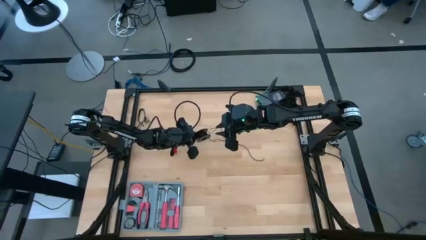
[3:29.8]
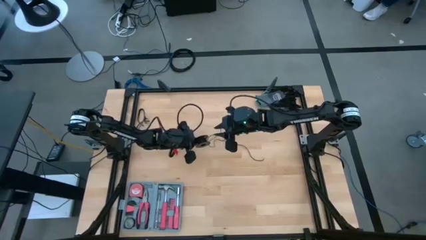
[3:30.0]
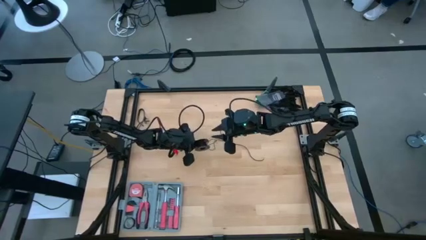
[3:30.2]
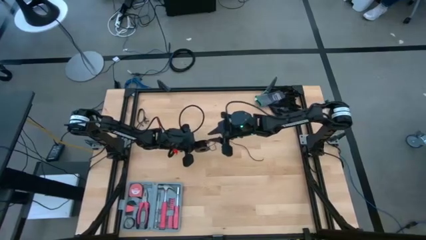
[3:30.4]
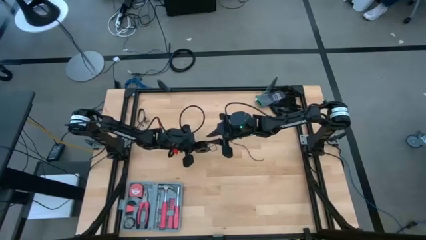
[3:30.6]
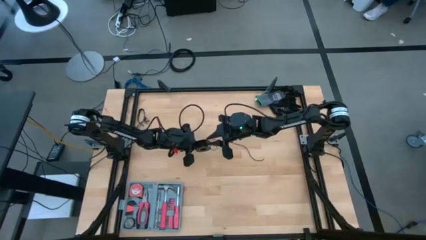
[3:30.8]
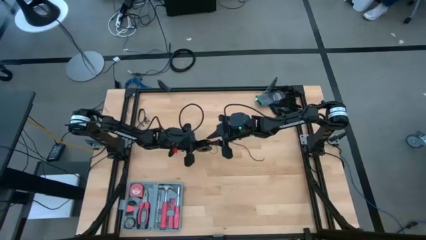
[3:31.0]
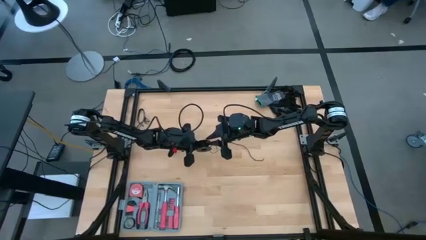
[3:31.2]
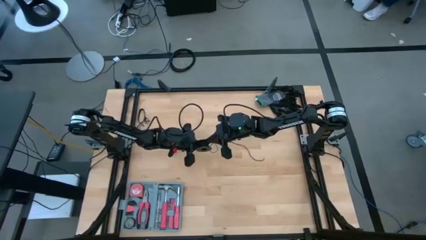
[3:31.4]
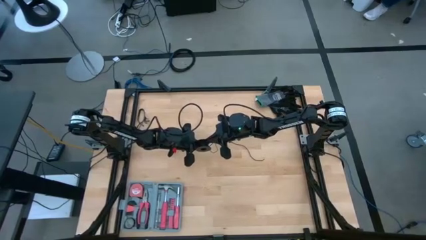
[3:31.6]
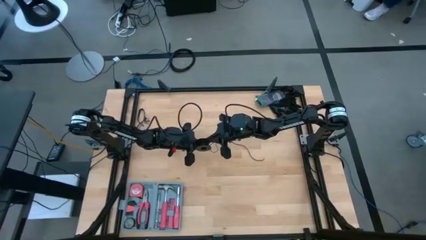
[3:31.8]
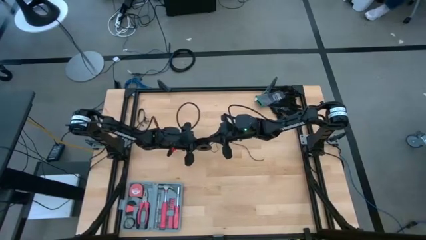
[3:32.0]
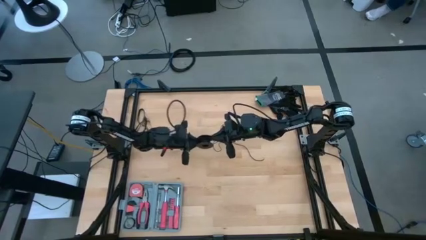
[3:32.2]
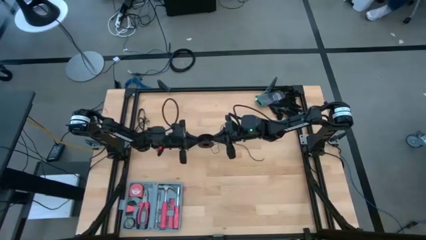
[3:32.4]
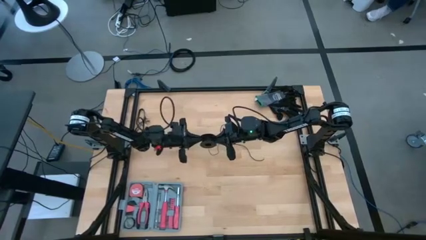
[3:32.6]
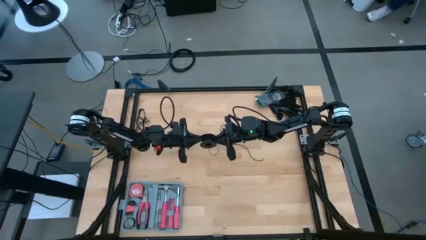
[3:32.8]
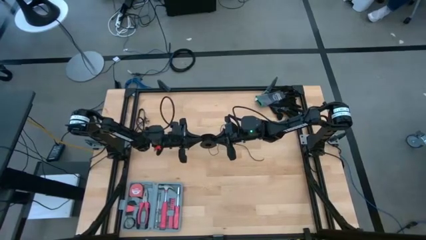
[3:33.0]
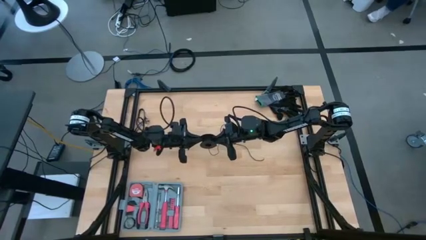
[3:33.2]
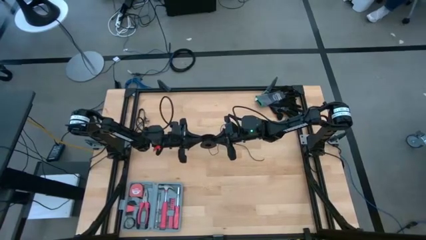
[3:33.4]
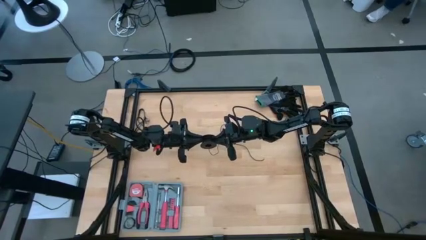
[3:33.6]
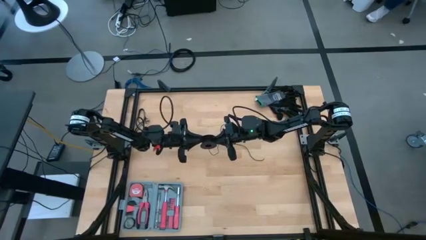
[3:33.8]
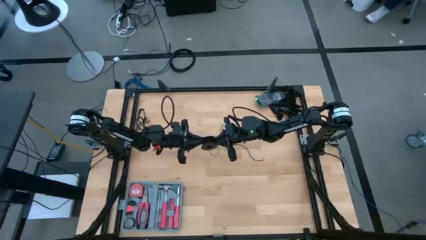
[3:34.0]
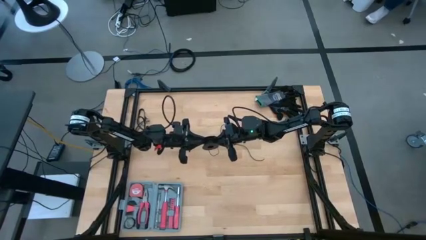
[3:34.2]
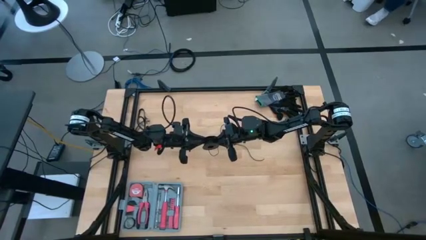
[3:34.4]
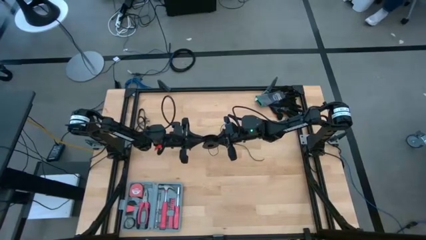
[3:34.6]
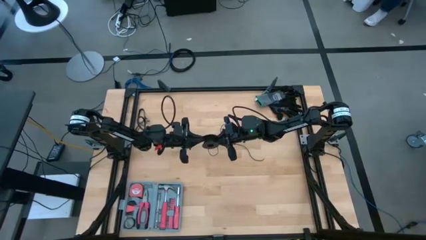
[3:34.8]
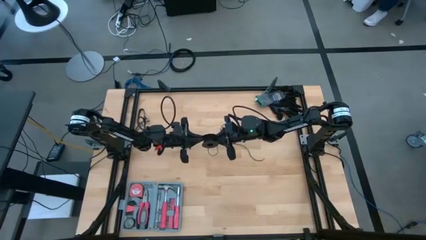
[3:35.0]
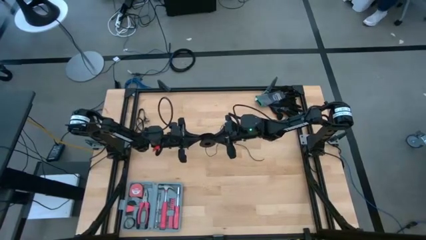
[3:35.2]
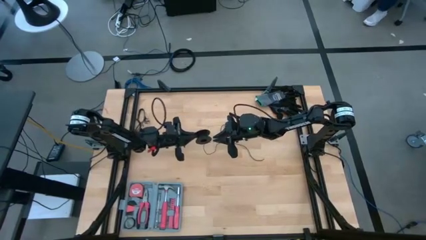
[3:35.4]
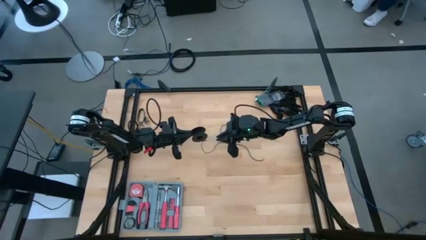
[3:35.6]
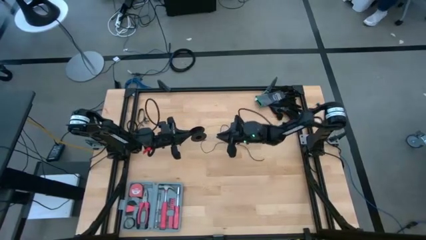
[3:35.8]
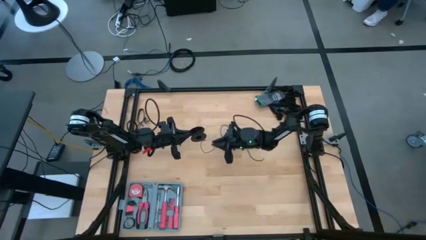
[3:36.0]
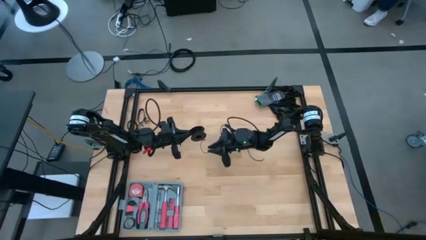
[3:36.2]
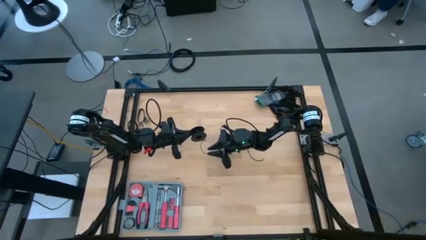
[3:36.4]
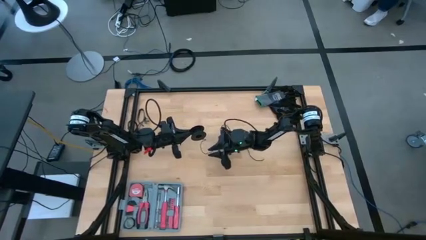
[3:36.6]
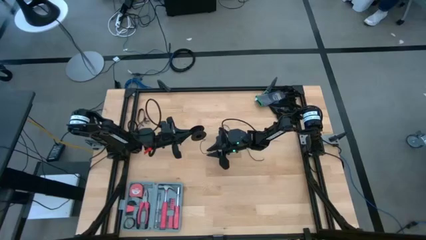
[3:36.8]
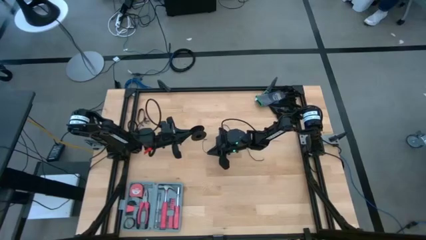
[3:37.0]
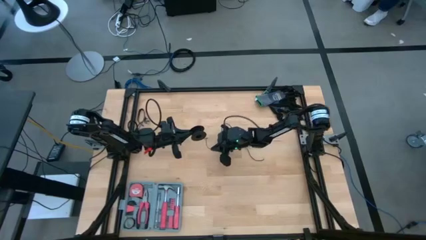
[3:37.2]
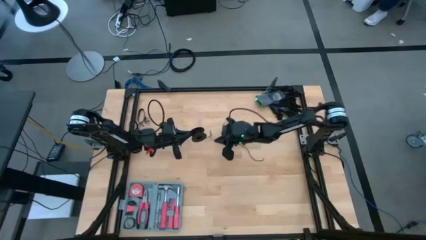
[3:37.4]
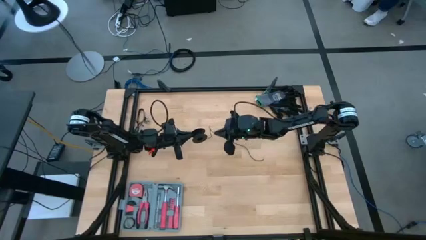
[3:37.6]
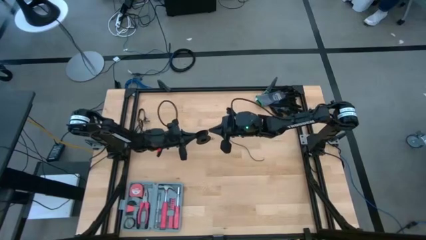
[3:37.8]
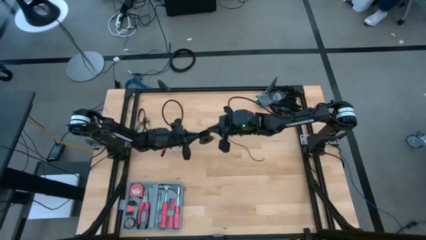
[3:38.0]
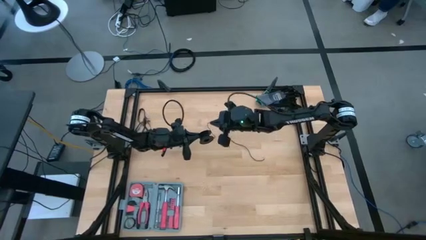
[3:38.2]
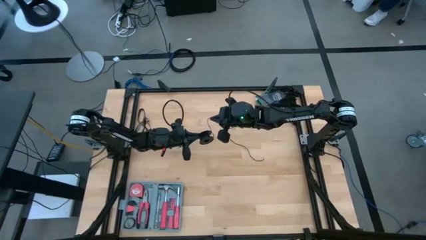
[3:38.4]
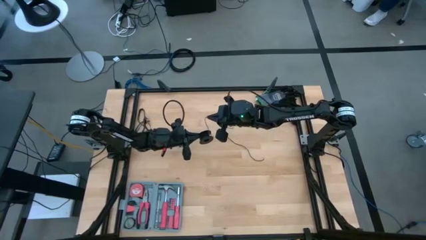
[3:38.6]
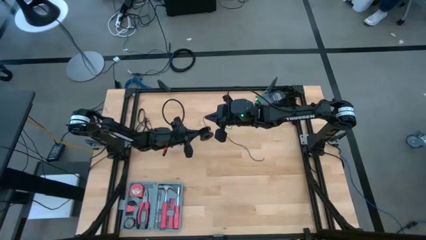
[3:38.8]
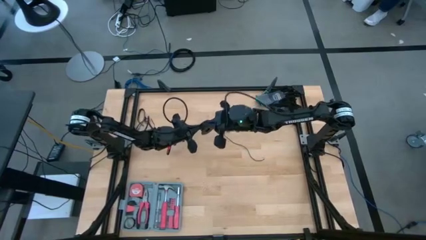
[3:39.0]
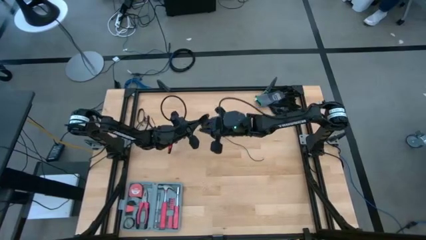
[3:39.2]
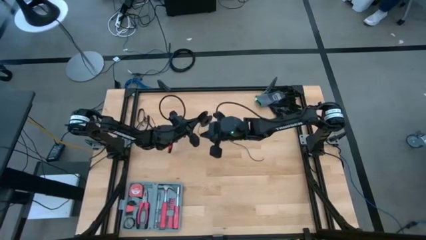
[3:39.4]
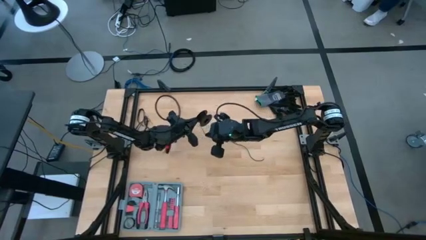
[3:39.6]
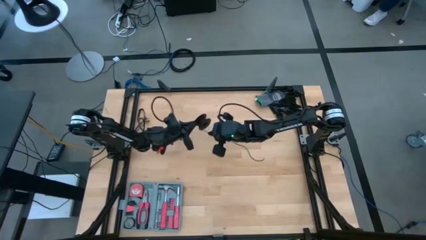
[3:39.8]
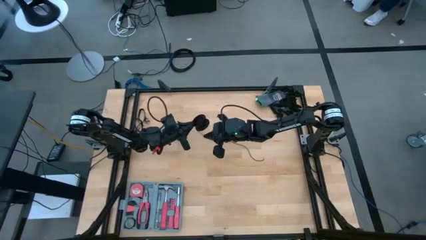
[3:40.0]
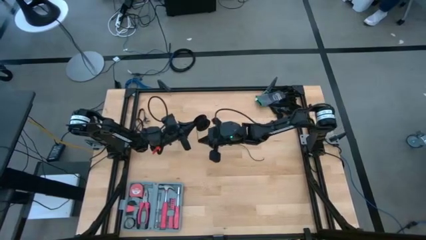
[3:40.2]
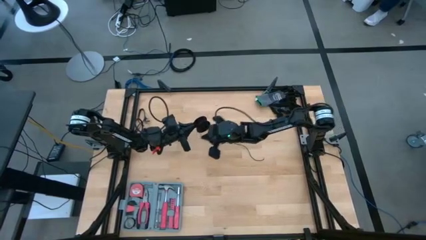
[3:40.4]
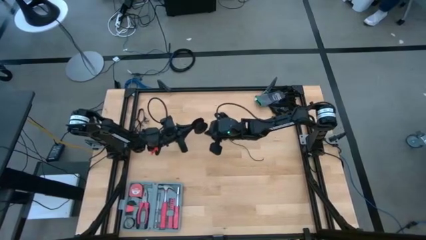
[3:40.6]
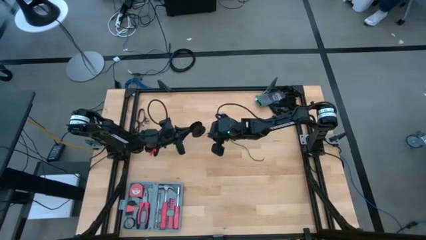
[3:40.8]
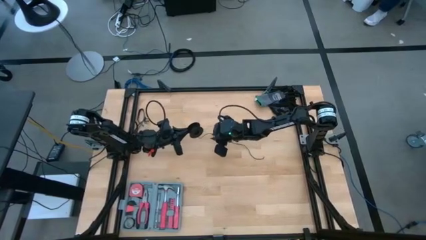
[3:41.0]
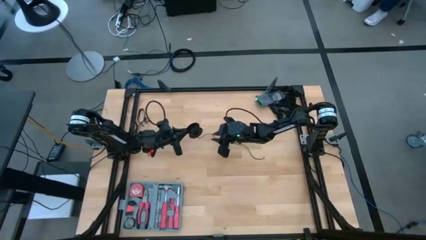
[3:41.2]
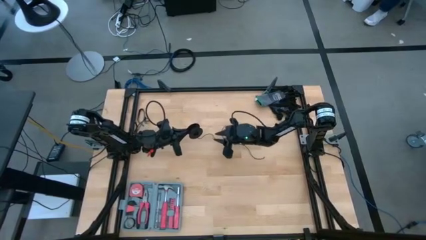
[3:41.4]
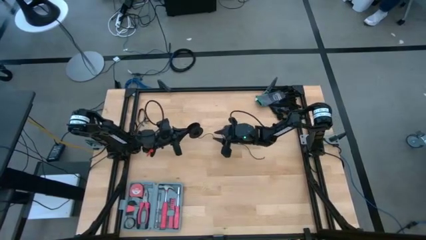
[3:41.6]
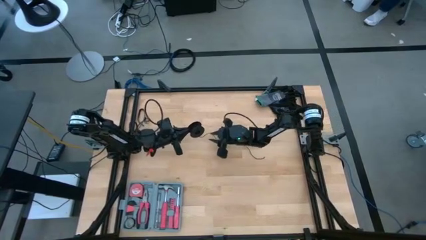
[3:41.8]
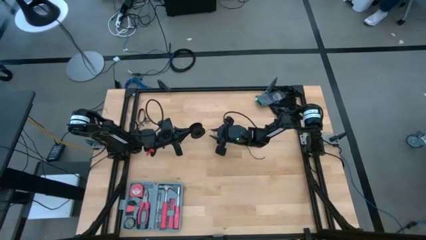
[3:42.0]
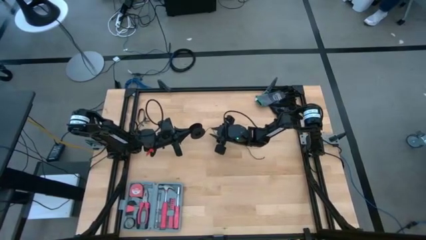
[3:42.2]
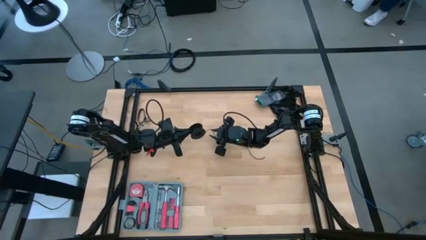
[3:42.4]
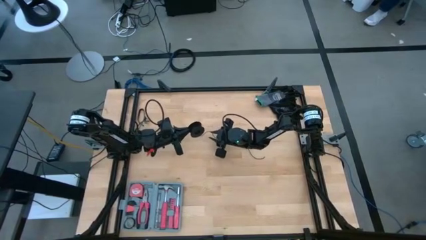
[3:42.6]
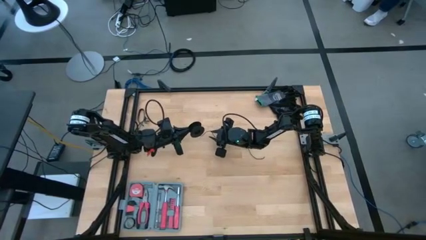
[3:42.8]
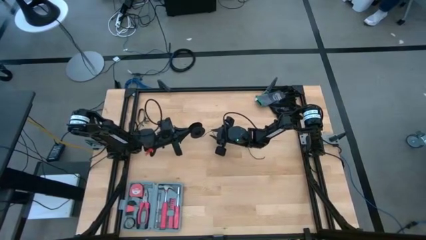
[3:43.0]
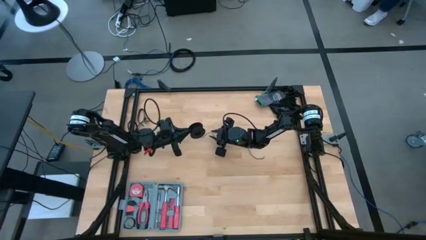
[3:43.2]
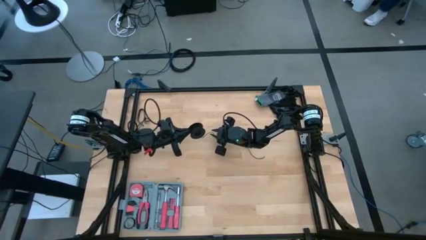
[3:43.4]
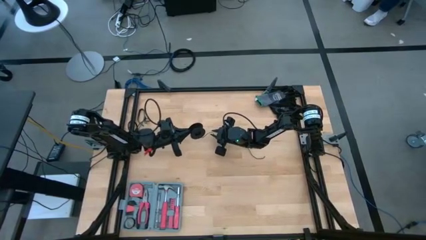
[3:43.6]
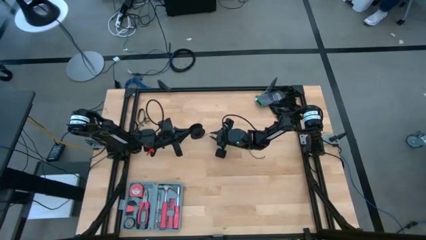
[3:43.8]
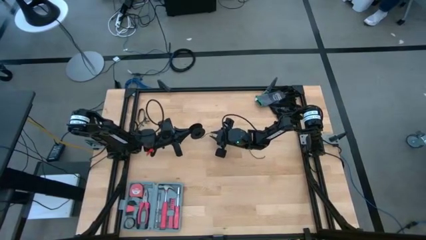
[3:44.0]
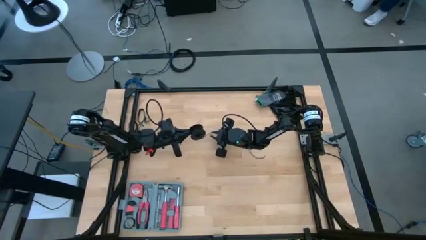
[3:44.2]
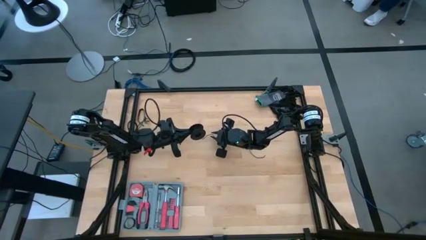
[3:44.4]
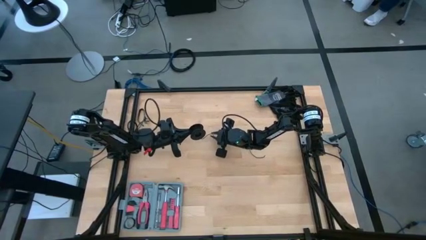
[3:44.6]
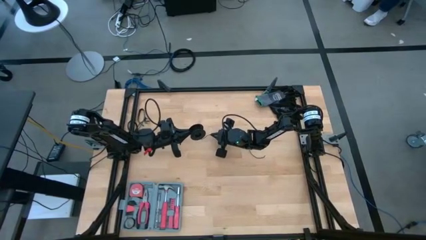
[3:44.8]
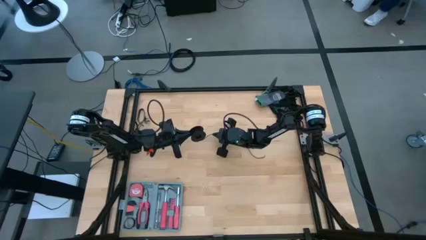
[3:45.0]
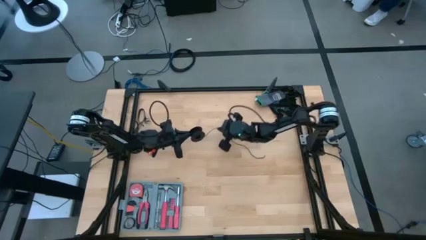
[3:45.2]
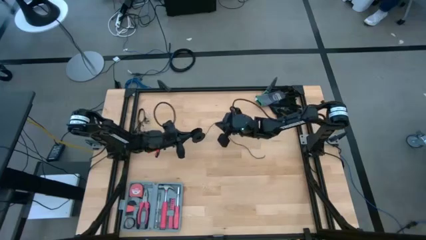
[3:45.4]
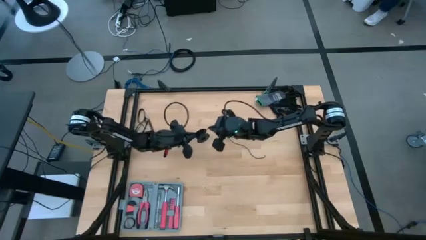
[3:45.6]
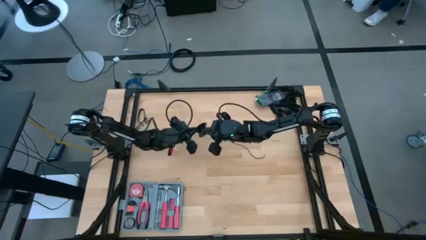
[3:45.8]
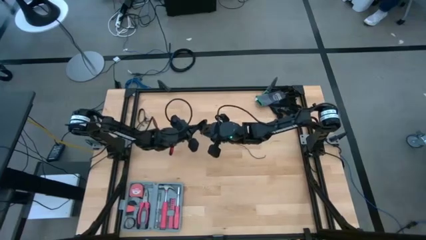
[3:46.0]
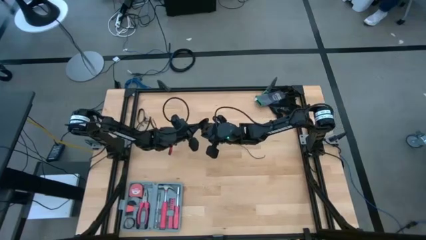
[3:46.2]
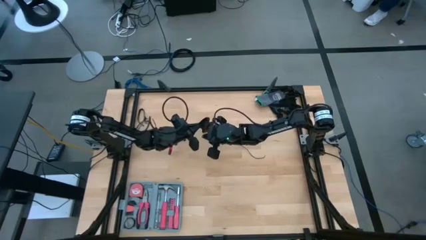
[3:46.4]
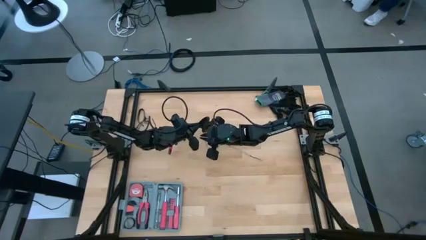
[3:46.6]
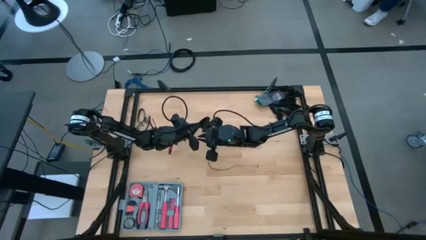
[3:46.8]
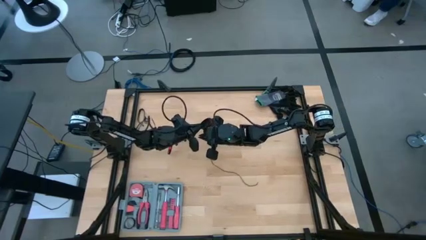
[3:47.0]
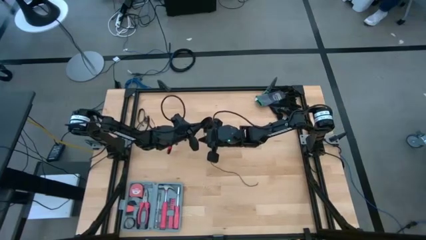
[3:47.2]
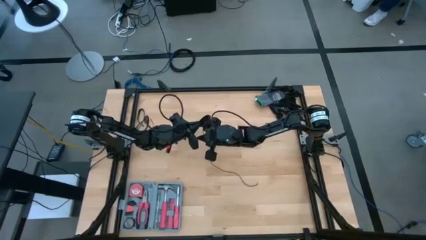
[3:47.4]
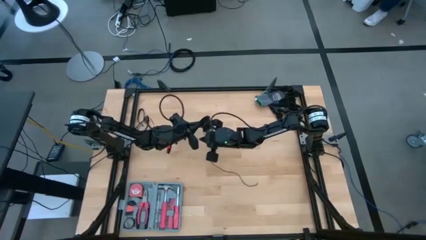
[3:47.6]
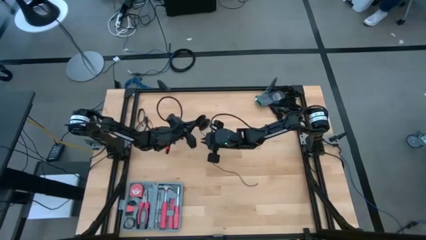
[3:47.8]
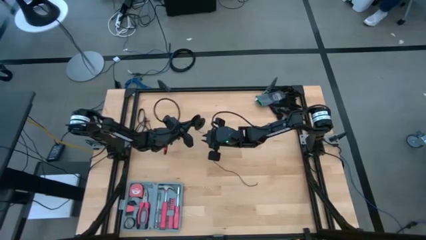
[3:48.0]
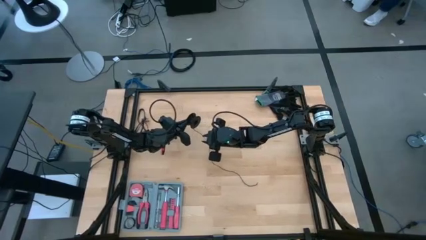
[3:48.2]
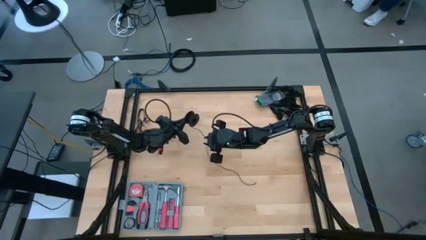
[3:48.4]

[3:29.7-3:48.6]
Task: Coil cords
Coil the black wire on the spool
